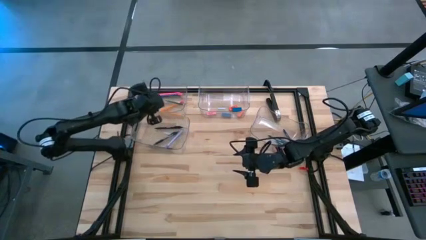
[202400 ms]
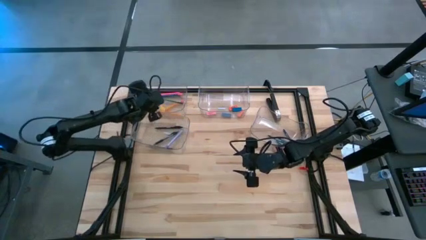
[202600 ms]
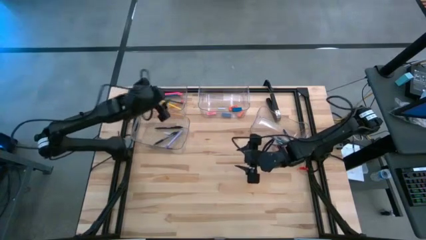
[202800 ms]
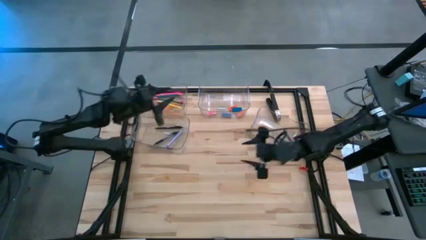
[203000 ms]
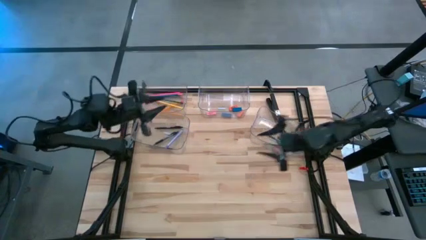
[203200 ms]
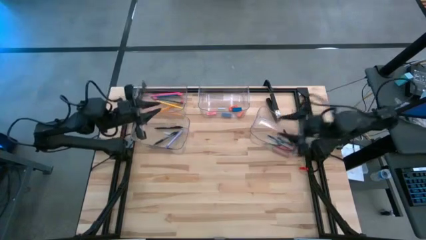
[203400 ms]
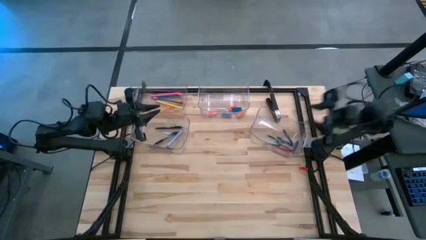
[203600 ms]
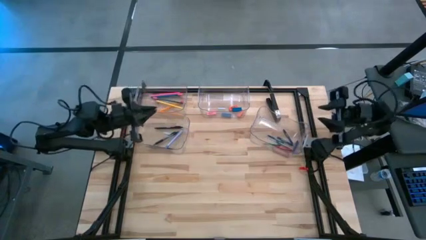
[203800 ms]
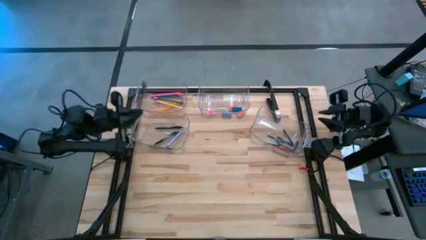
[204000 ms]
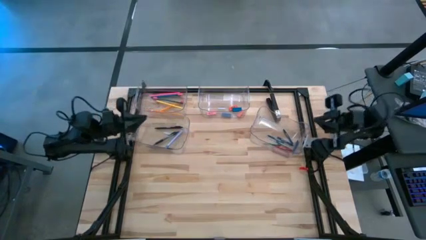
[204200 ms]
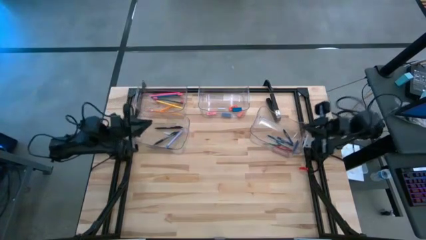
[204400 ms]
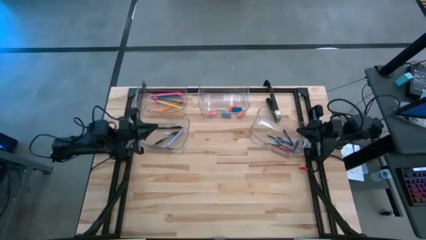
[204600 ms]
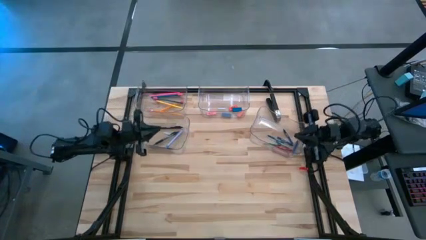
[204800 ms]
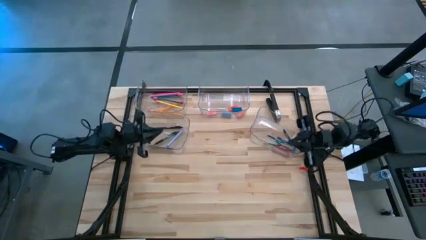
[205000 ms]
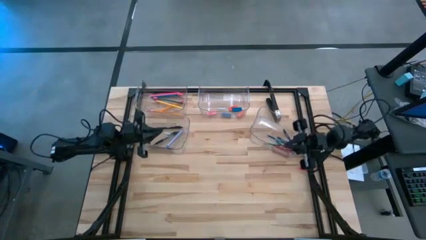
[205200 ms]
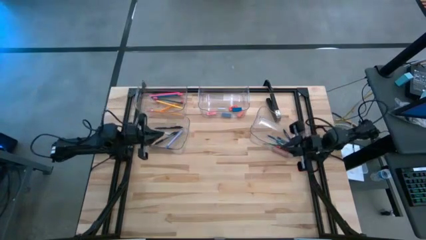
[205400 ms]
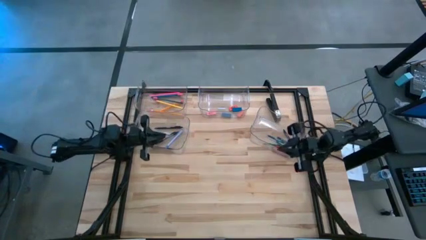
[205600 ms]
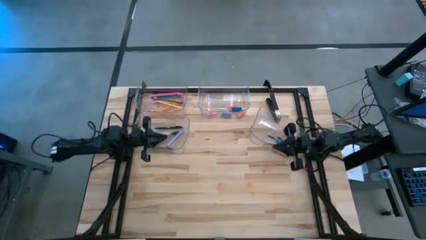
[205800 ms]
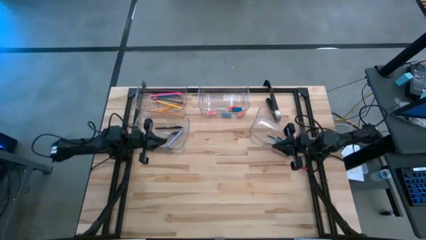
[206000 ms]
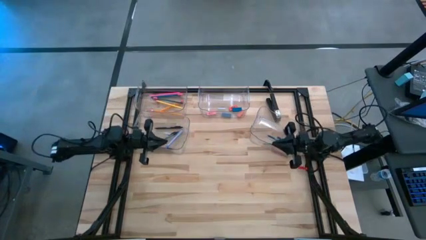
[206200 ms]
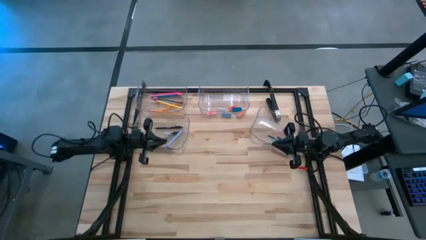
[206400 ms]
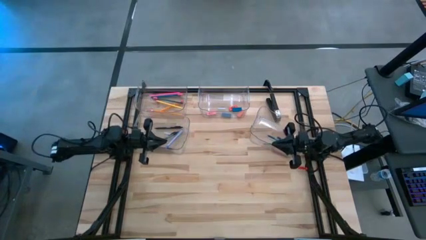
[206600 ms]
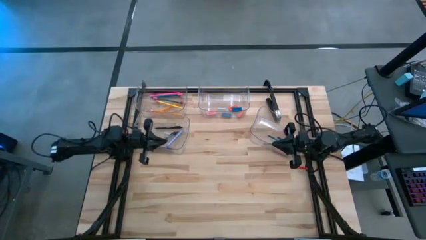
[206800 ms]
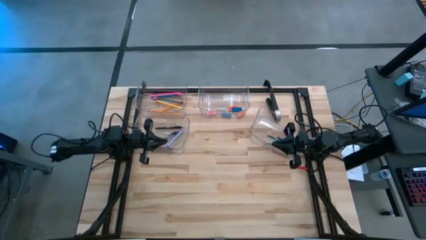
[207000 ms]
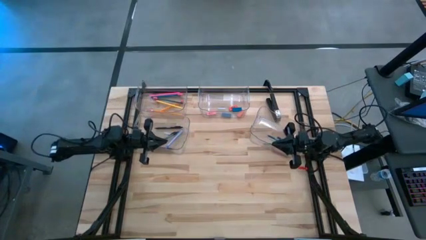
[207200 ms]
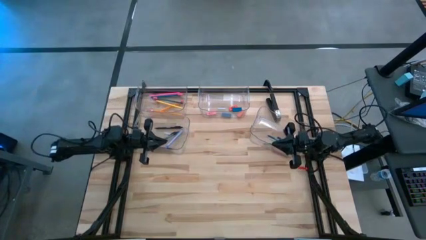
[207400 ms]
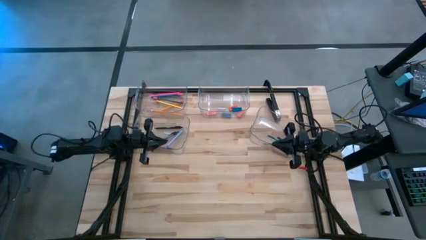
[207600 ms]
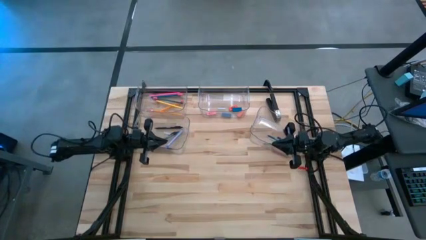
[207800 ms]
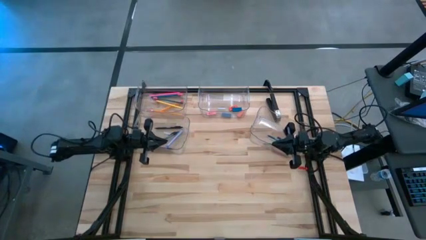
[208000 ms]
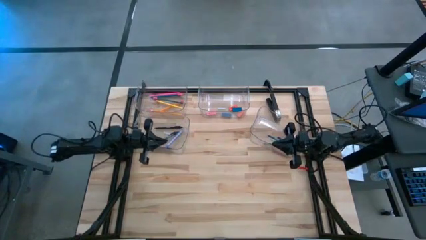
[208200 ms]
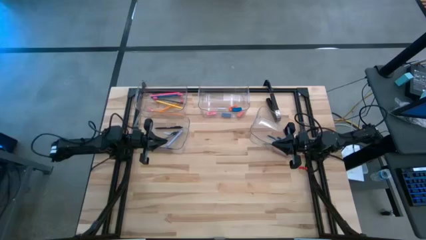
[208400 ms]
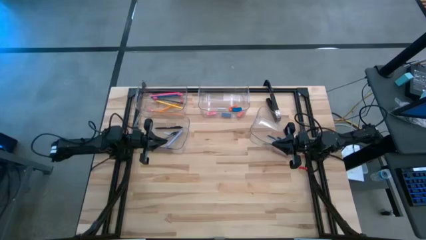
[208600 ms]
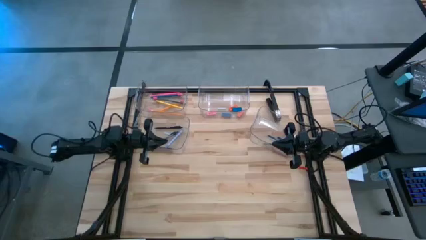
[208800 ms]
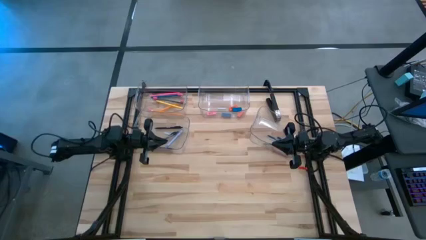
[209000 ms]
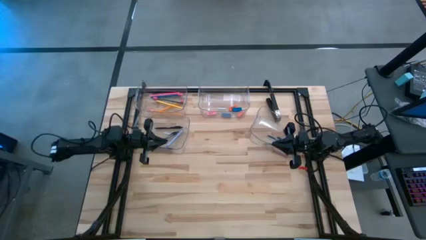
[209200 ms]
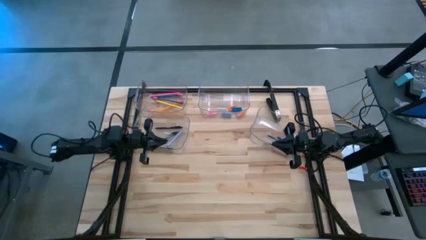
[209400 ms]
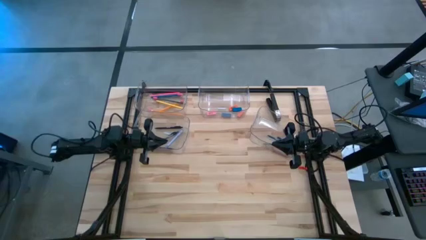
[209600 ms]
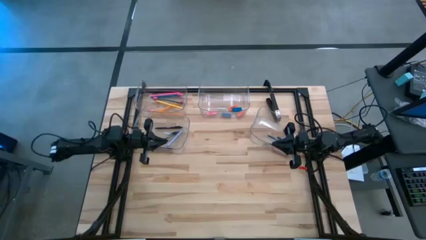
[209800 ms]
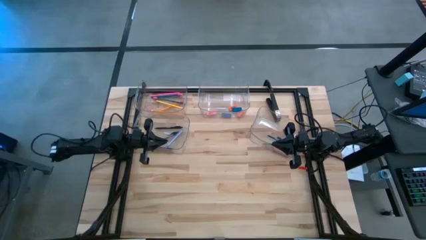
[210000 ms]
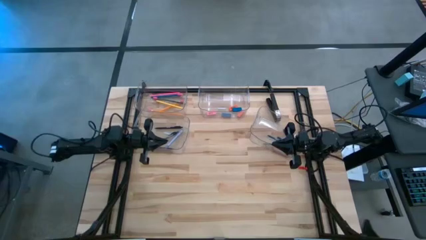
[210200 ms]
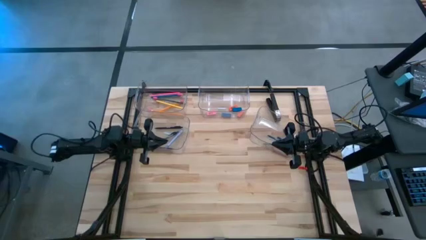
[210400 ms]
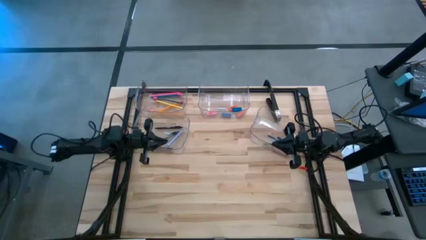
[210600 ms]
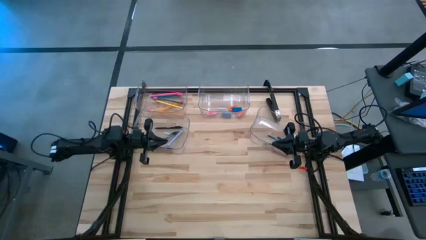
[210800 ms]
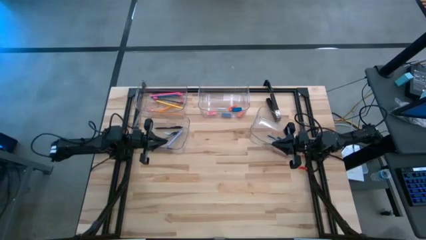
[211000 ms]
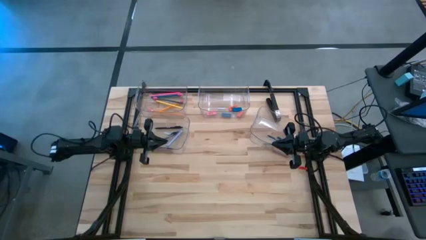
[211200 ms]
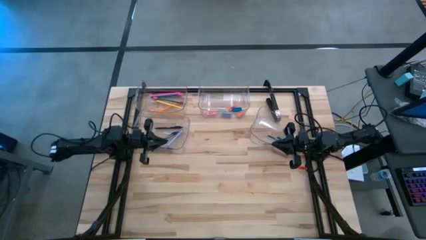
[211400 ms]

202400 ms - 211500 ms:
Task: Sort crayons/erasers/pens/pencils in bins
Return to Home Position

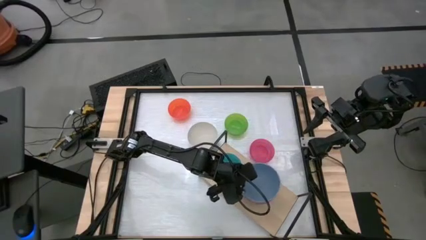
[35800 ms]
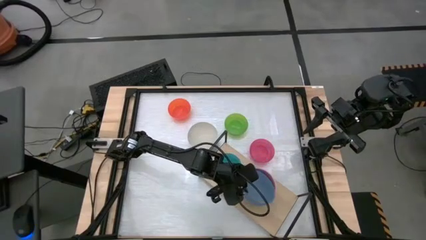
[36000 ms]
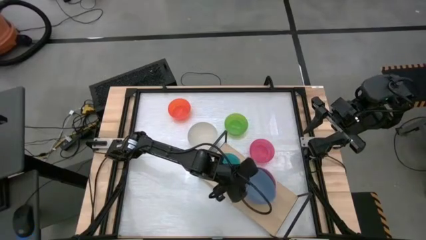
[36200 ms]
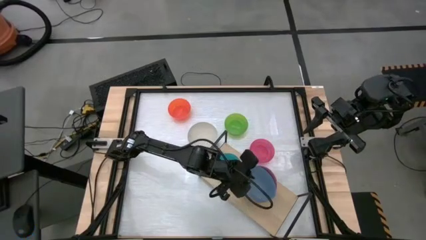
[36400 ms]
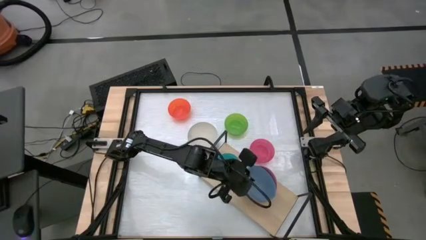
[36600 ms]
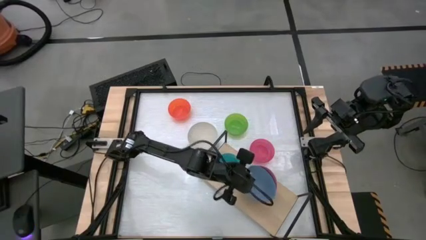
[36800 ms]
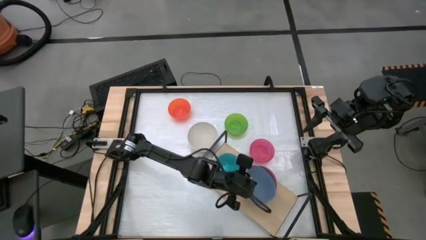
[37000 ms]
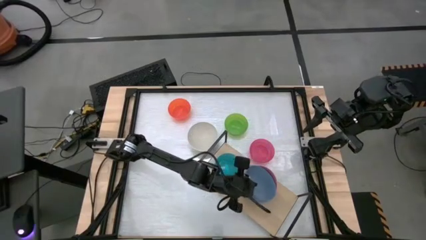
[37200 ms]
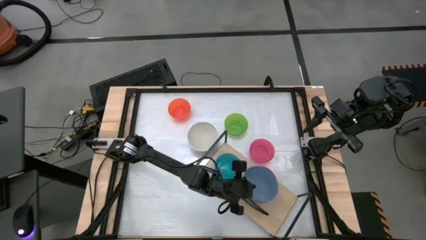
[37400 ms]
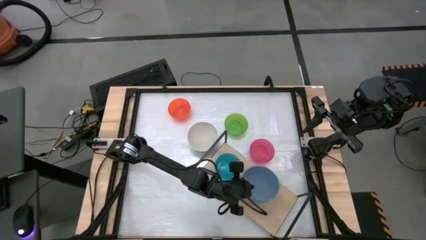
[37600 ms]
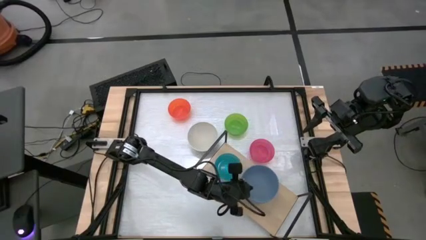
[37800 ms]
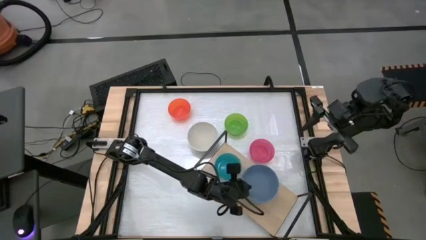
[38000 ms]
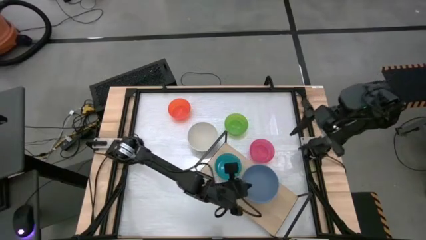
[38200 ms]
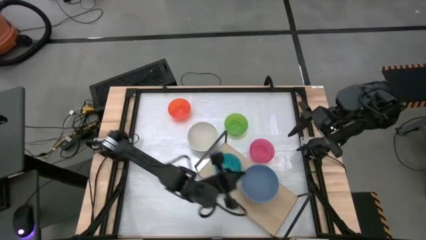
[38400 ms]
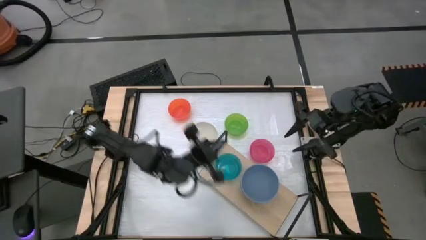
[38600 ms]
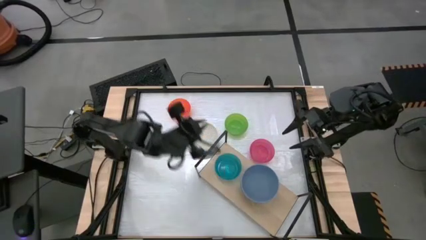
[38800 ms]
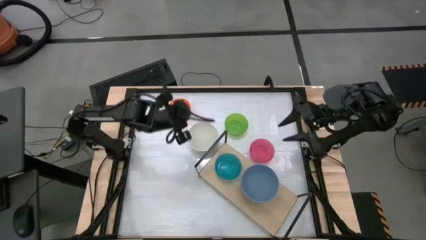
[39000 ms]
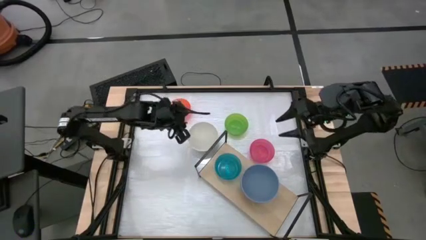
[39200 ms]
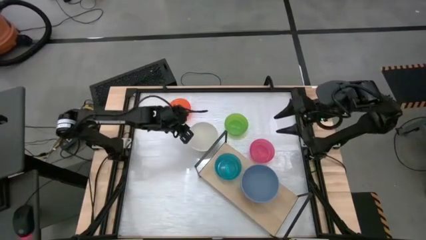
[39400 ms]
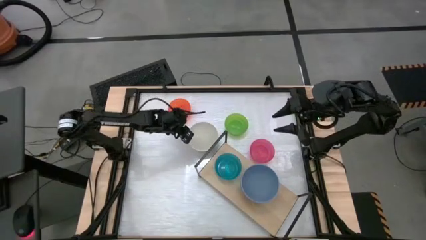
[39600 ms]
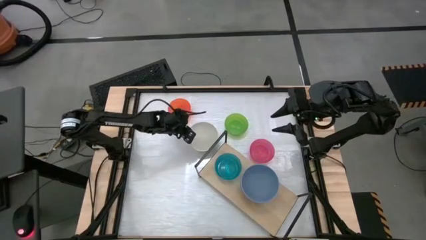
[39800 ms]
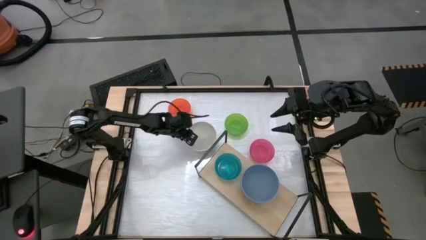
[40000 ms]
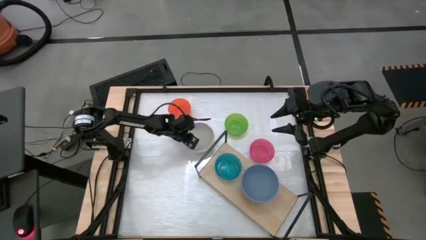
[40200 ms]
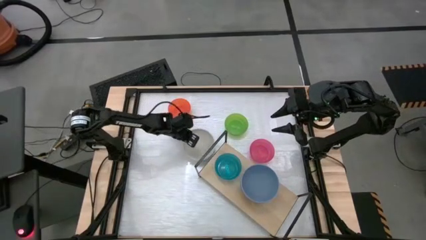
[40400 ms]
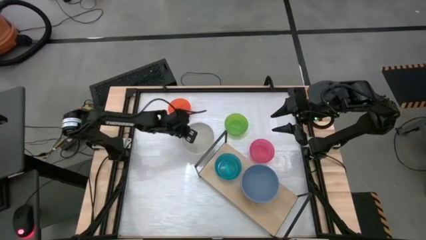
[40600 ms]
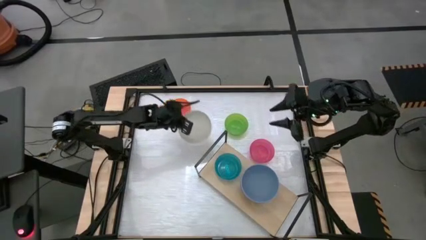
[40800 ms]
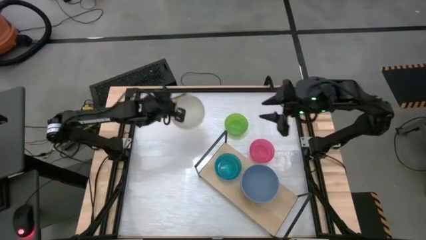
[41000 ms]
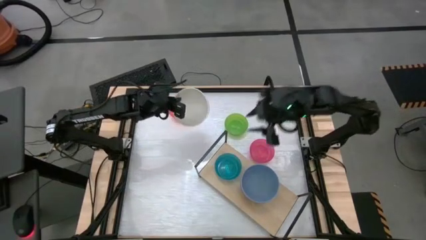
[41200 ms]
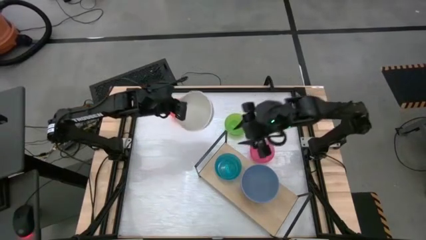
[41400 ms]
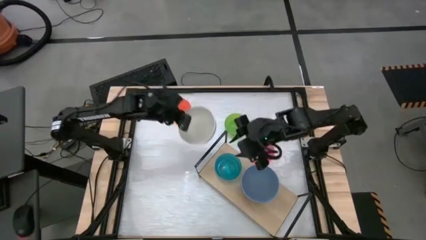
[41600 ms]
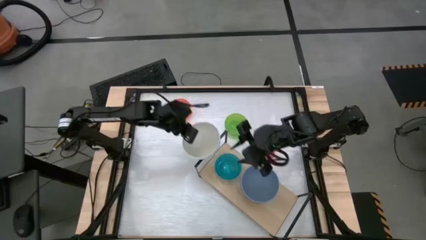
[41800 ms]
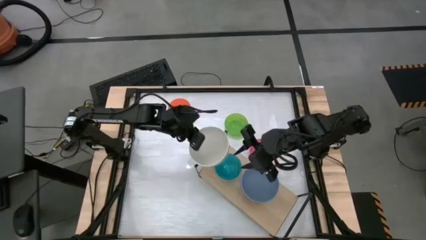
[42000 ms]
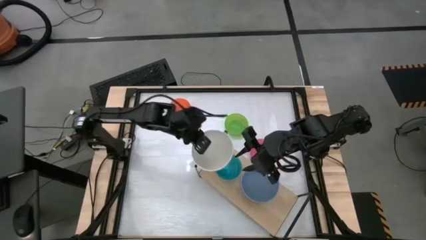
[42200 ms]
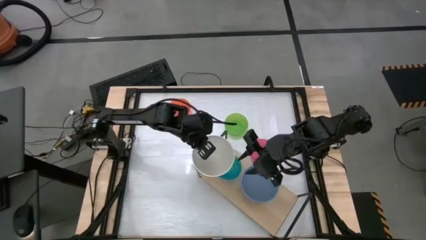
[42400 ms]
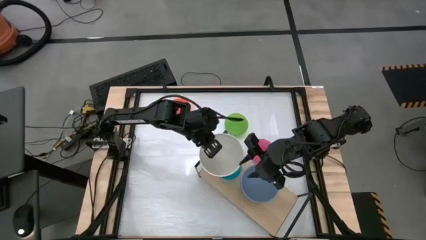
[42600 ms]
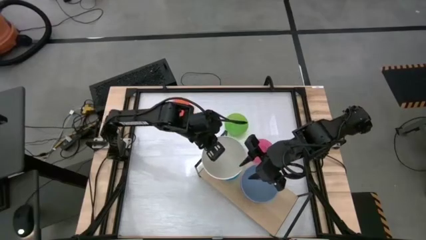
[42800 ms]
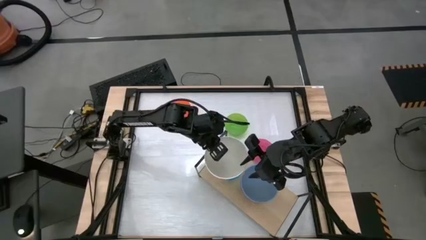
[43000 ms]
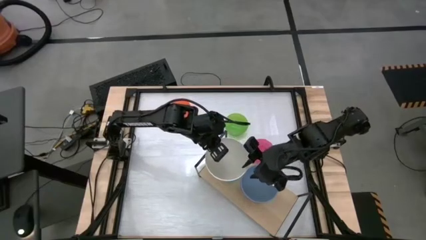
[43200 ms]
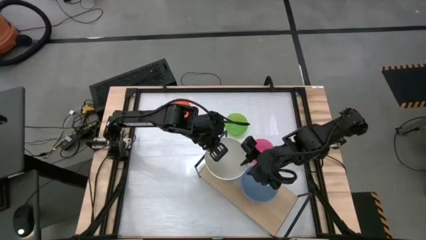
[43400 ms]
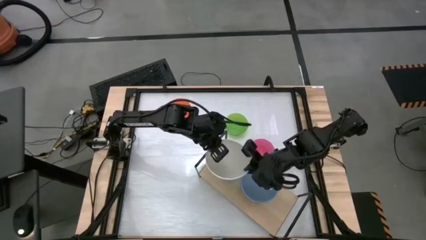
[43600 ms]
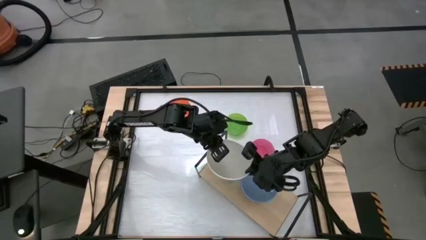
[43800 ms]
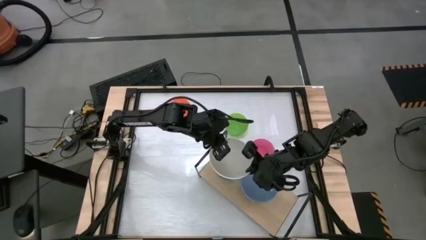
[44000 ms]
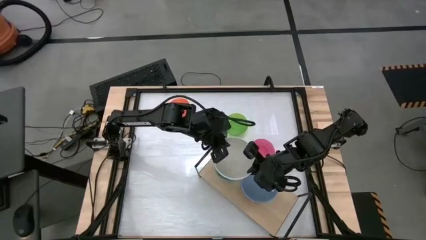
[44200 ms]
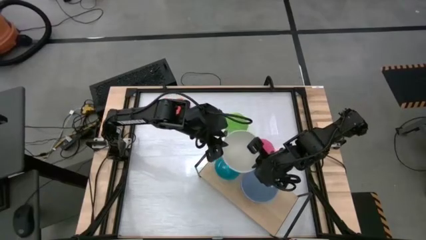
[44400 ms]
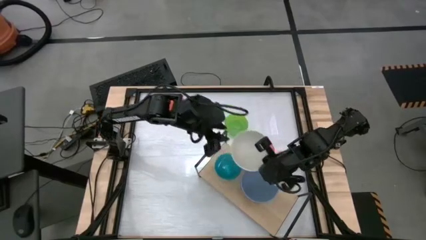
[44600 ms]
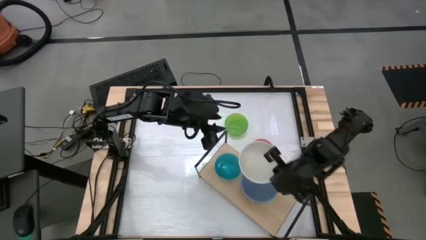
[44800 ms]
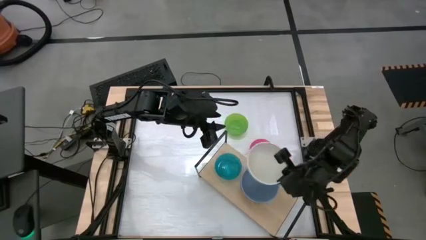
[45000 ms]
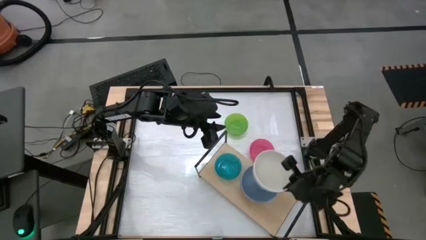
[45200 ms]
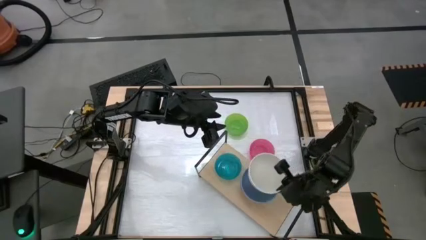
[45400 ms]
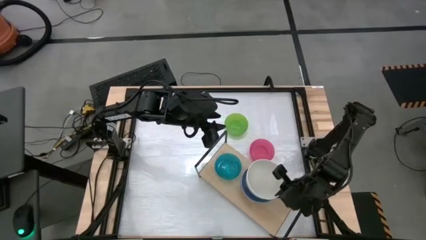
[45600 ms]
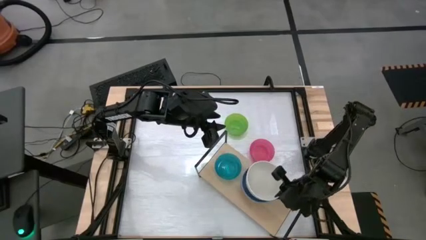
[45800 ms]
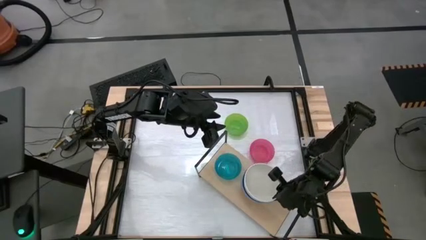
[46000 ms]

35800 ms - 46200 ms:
Task: Place and stack bowls onto a shelf
Stack the large white bowl on the large light blue bowl on the shelf
